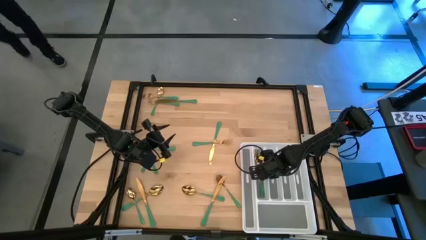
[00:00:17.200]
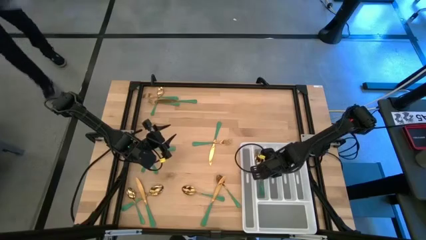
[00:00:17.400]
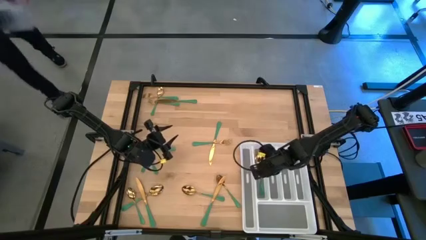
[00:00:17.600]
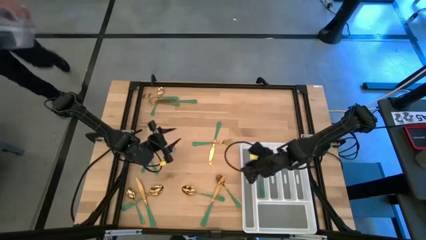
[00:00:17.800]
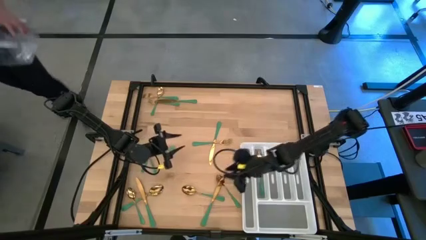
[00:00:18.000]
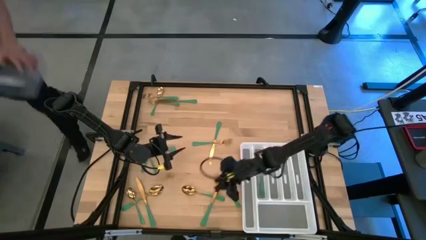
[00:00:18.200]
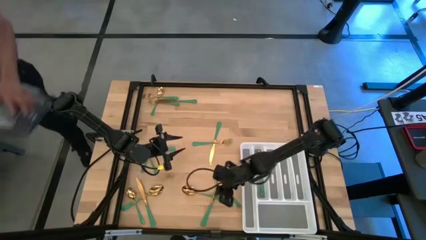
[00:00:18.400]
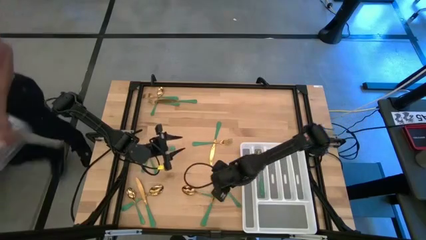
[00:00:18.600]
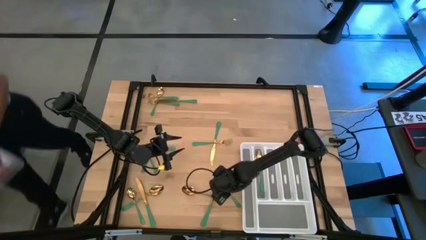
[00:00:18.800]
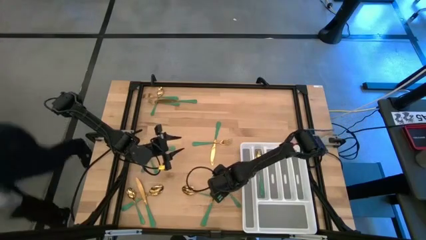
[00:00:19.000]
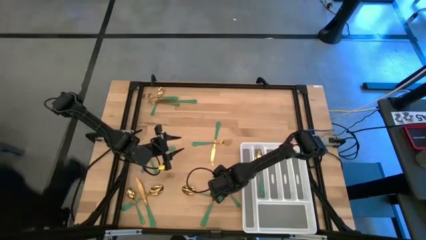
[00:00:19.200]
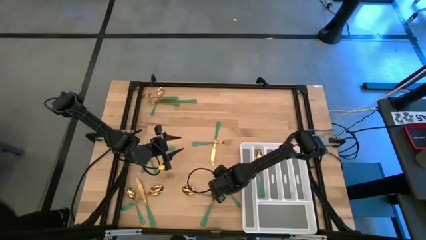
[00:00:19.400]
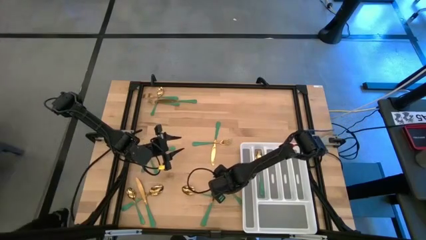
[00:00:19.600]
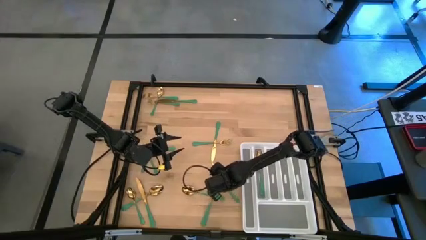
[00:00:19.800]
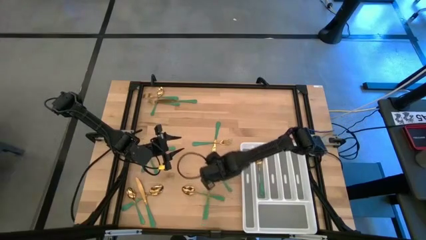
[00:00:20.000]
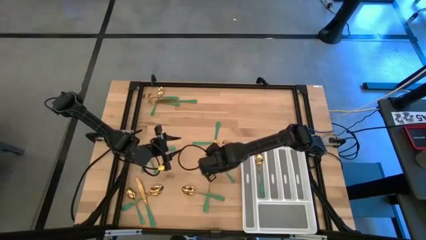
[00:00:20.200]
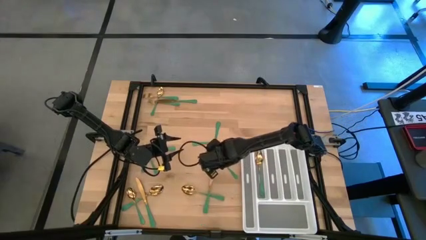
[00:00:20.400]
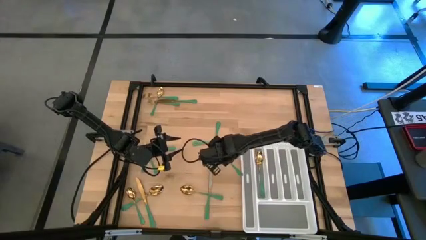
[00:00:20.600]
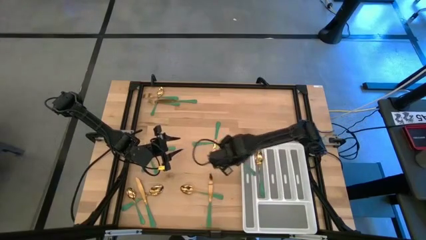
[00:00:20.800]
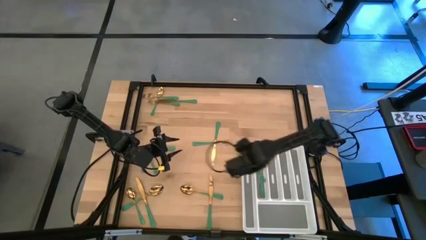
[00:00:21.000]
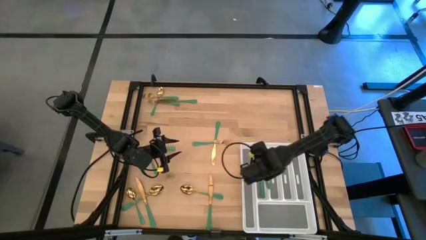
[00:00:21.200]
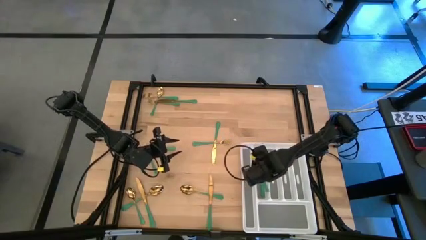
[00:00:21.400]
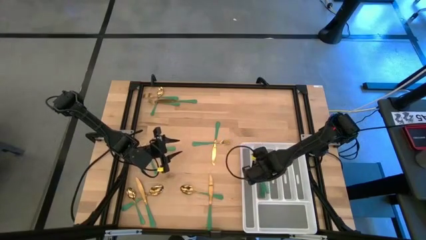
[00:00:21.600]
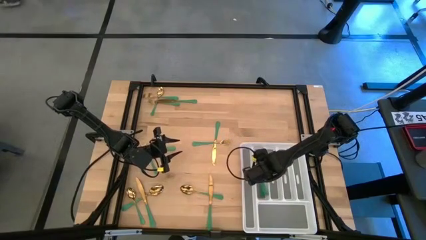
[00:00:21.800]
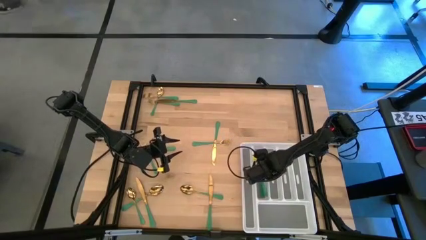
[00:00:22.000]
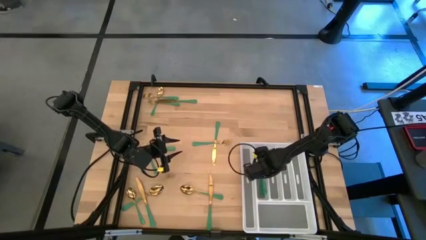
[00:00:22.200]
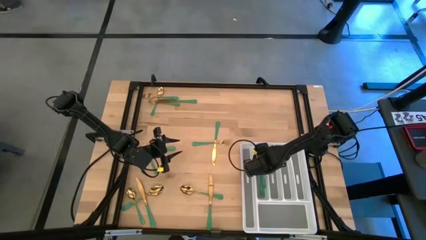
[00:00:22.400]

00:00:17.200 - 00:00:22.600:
Task: Sort silverware
Put the bottom right green spoon into the silverware rack

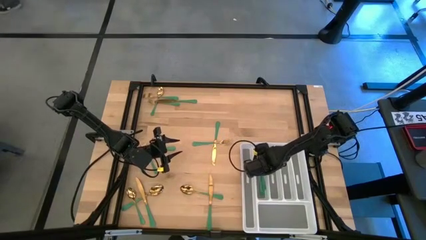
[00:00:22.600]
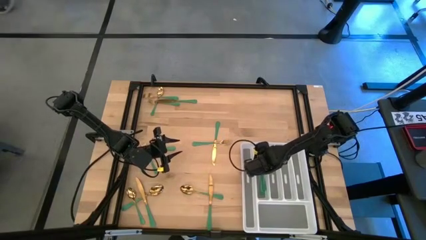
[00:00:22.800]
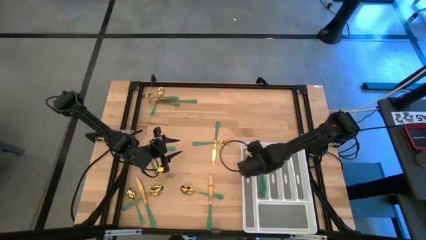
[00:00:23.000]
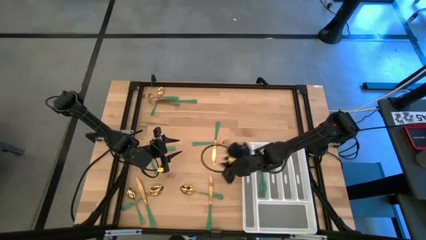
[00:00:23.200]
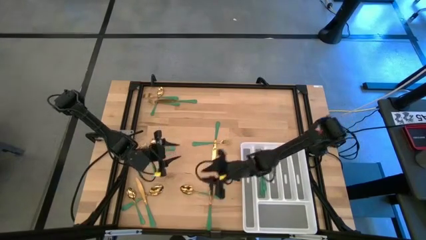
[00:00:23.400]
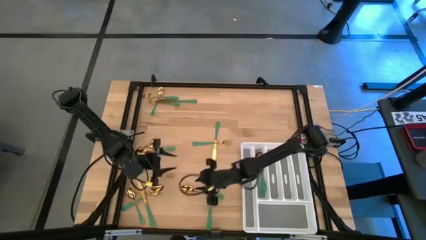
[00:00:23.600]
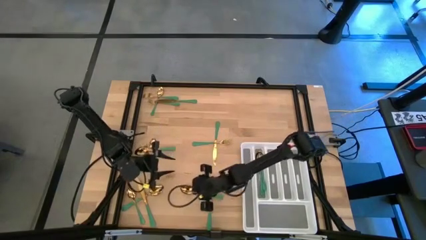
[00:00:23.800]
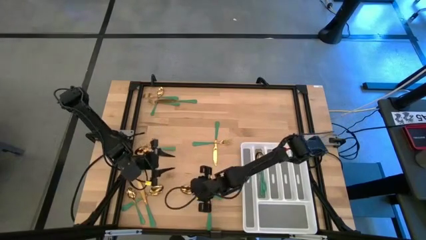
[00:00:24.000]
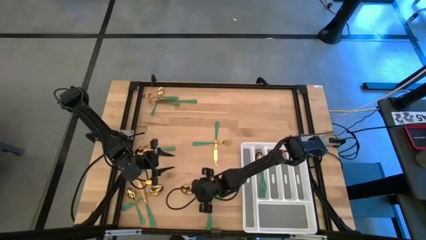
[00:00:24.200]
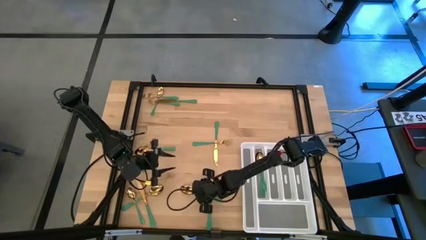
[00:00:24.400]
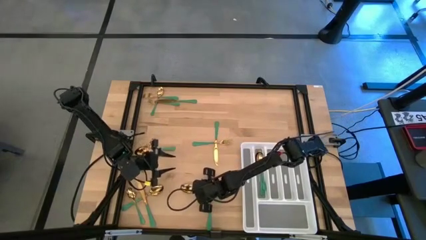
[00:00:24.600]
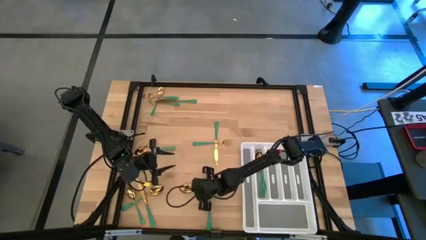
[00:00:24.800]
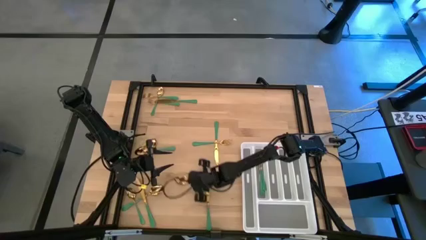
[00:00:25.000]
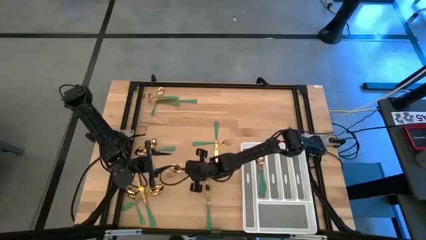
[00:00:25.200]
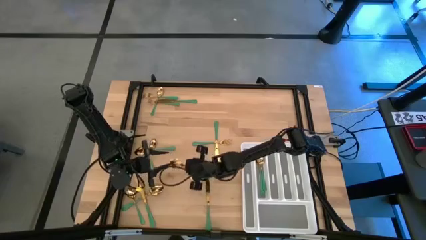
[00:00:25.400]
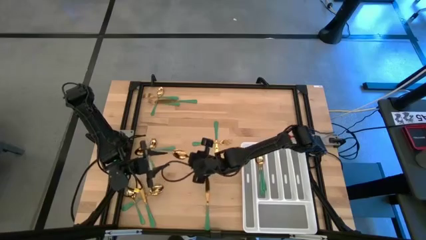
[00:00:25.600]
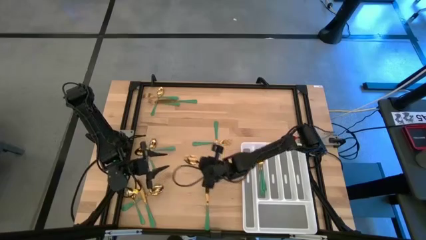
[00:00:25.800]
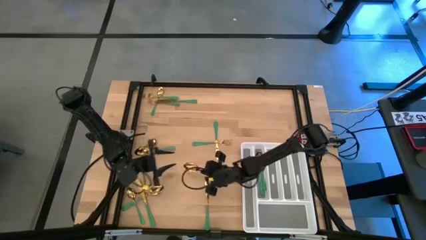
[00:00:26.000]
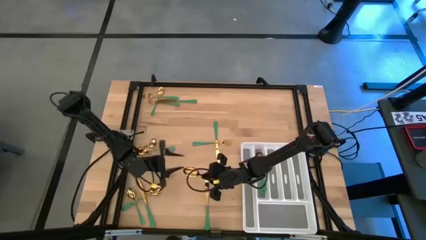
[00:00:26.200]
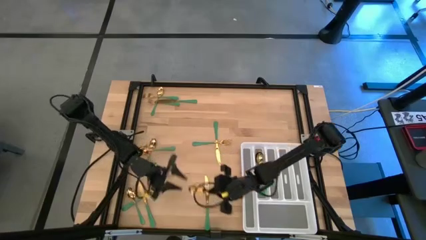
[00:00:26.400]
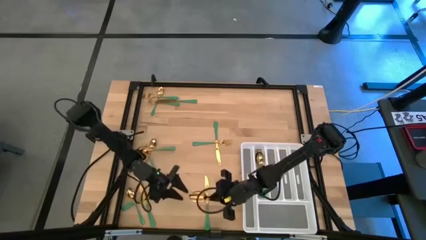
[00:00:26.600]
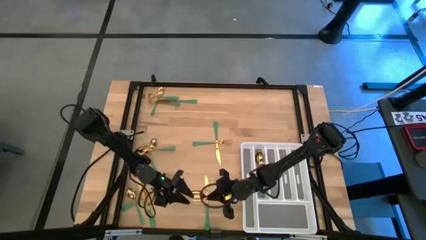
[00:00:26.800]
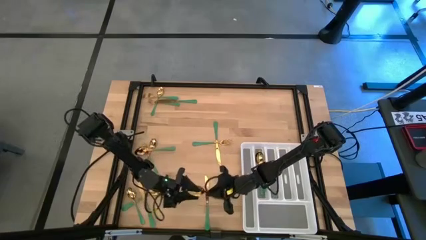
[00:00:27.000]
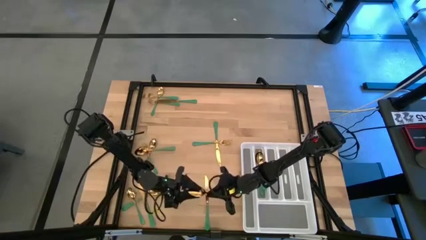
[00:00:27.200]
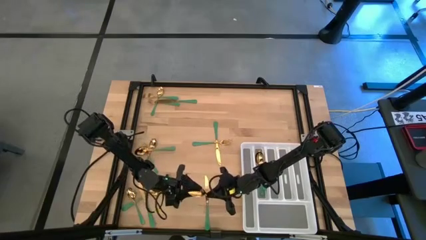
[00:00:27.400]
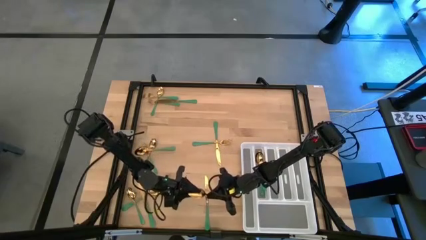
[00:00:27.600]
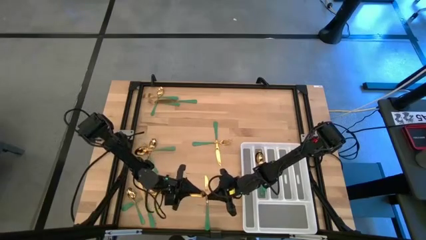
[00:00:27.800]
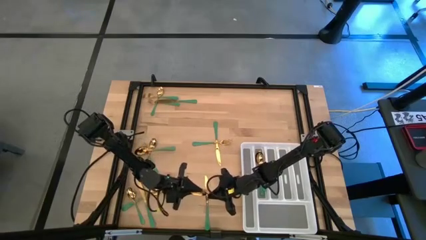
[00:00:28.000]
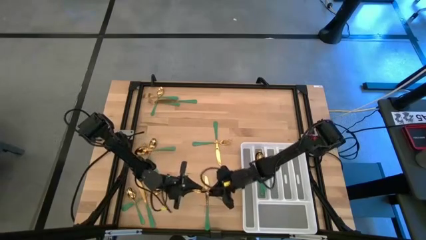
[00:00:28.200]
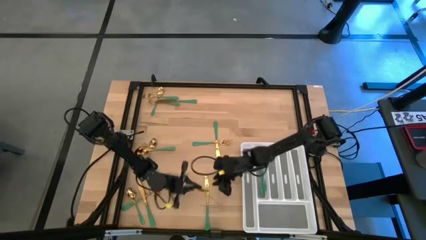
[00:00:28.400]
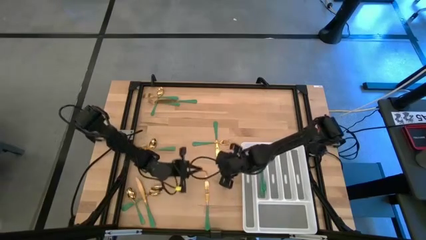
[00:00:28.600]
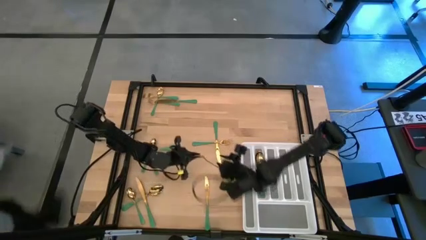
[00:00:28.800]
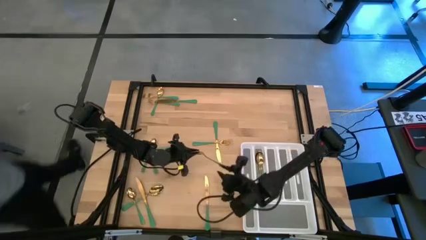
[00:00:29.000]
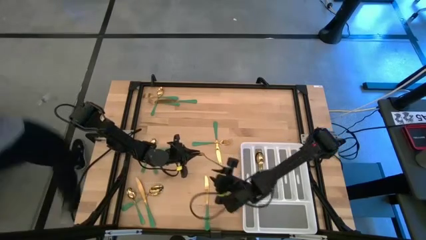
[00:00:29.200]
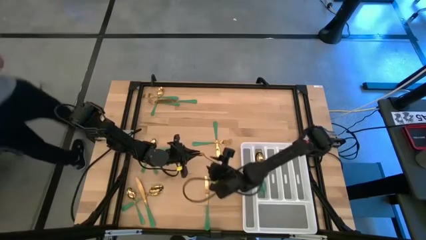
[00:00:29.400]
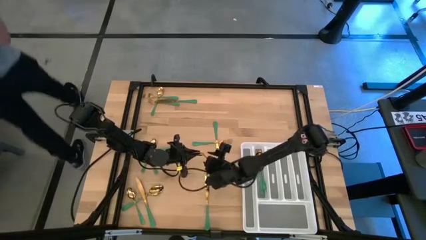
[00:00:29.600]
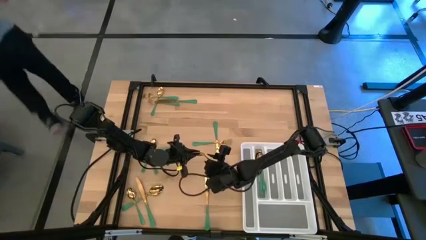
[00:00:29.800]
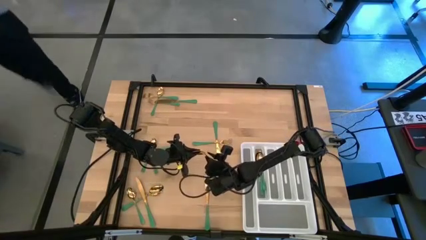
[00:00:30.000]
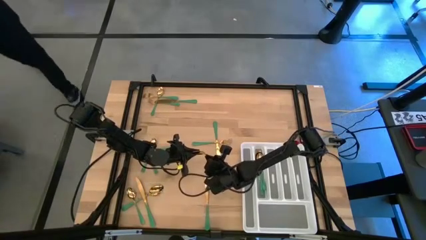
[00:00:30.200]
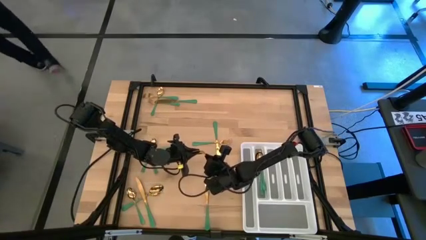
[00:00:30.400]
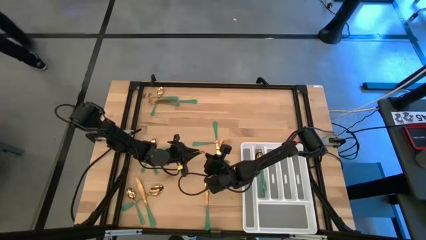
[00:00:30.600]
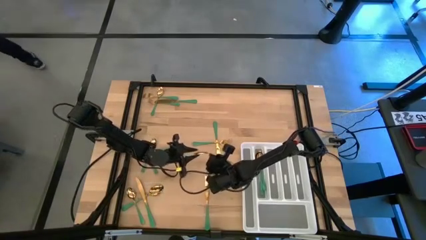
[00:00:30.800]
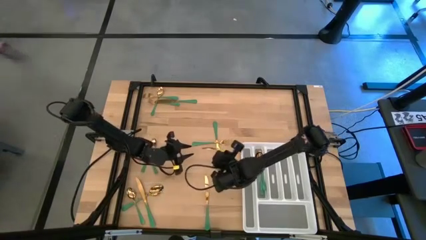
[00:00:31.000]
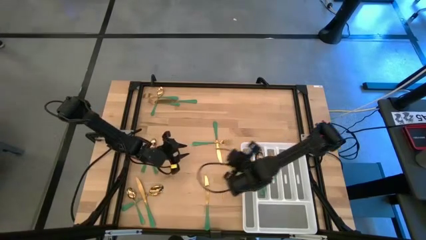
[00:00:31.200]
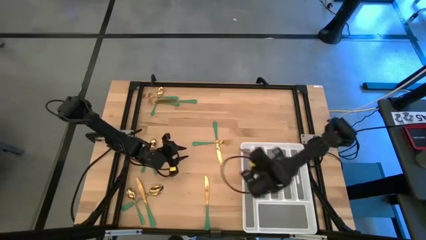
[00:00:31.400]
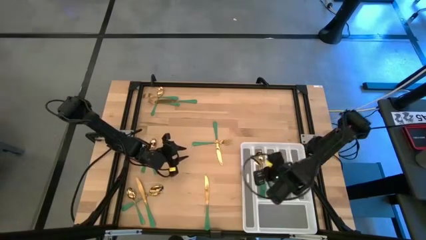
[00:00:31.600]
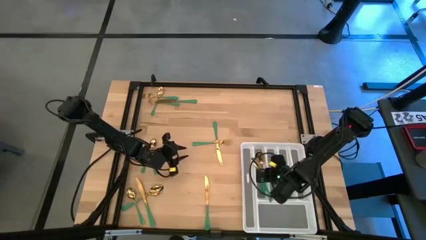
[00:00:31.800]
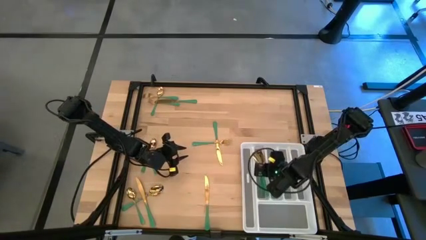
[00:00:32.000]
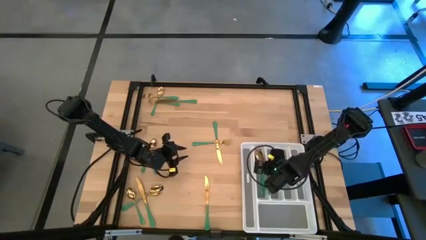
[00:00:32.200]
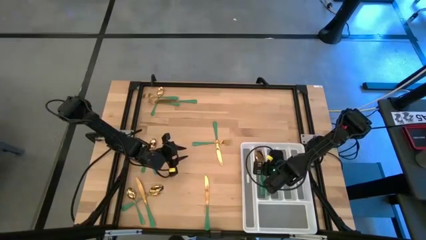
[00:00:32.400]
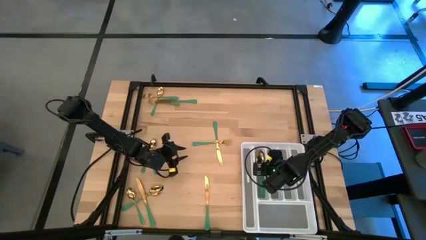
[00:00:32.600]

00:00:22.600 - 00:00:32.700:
Put the bottom right green spoon into the silverware rack
